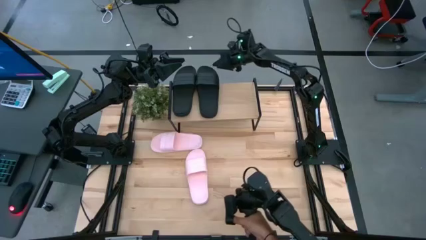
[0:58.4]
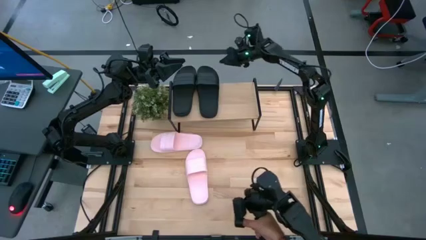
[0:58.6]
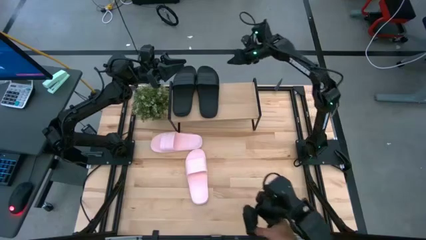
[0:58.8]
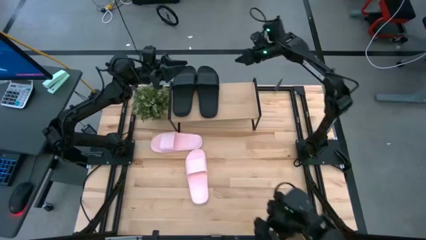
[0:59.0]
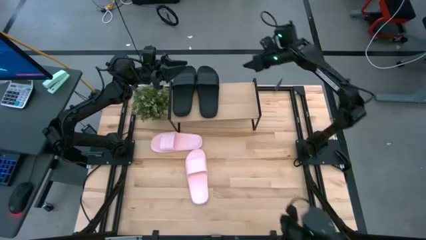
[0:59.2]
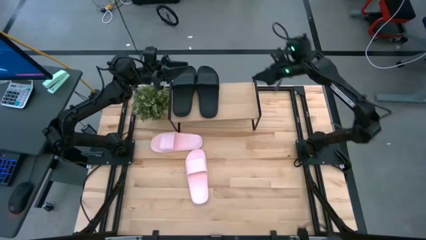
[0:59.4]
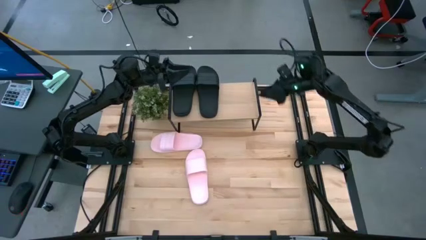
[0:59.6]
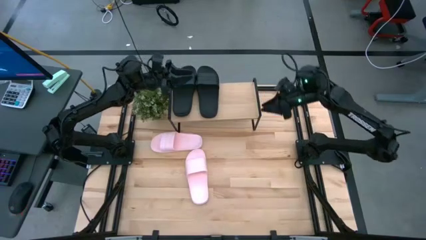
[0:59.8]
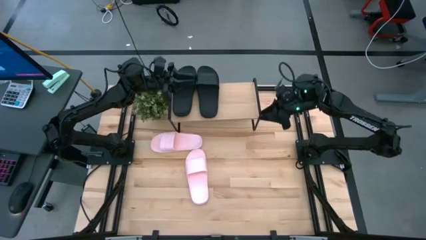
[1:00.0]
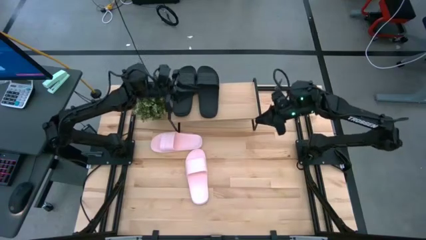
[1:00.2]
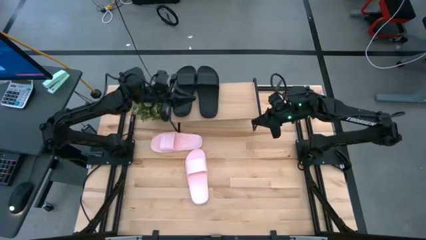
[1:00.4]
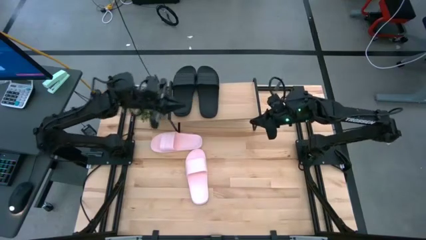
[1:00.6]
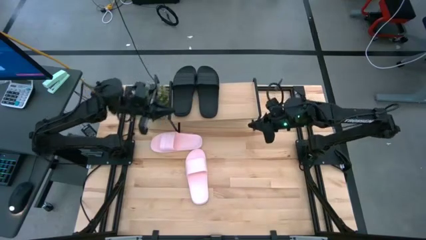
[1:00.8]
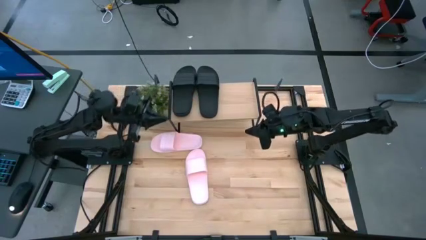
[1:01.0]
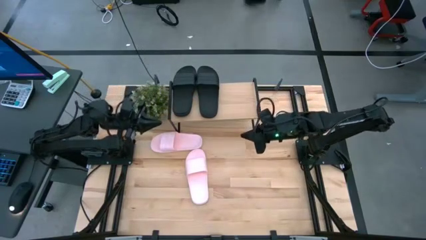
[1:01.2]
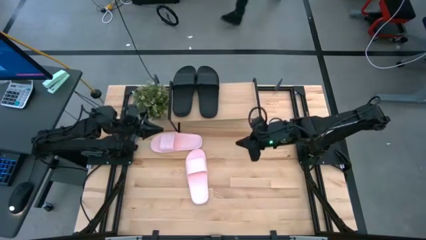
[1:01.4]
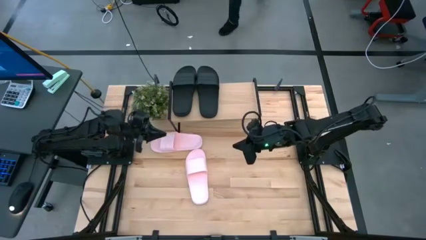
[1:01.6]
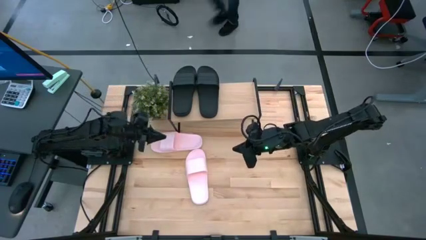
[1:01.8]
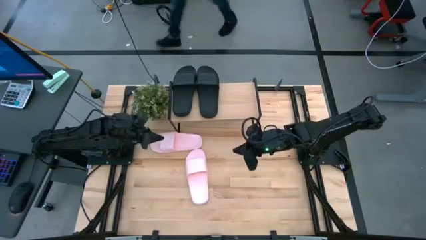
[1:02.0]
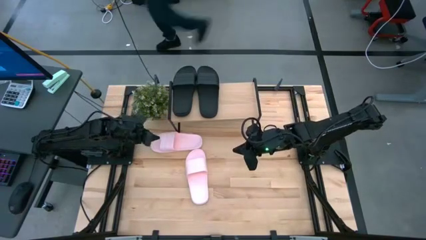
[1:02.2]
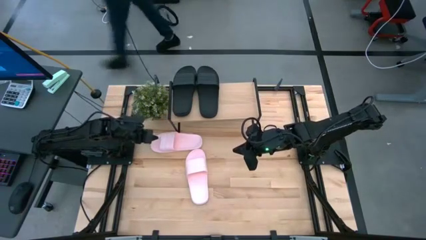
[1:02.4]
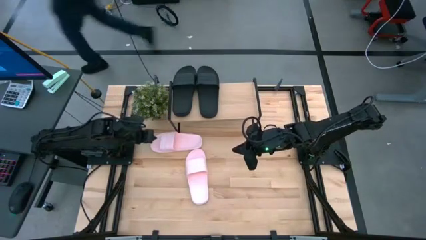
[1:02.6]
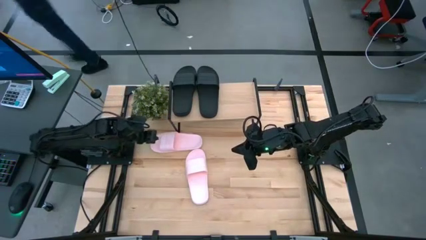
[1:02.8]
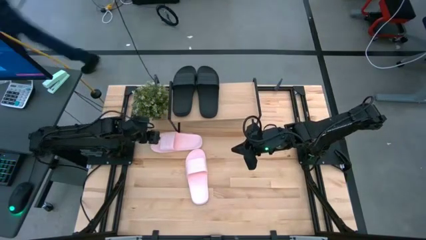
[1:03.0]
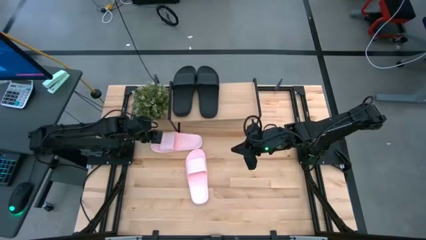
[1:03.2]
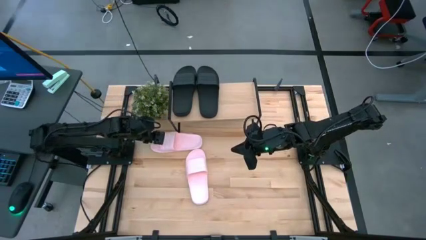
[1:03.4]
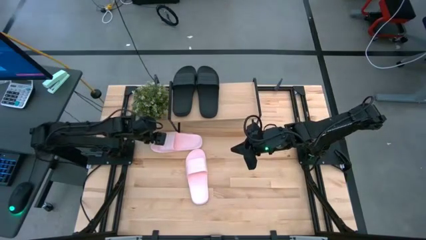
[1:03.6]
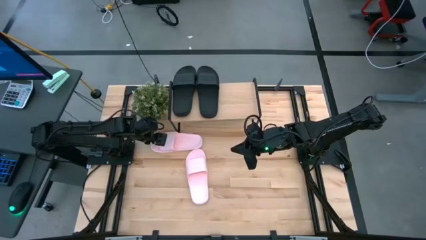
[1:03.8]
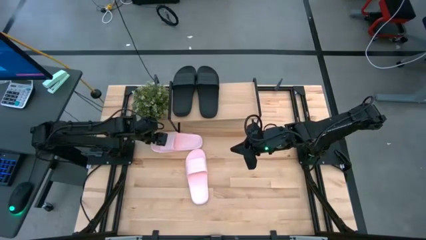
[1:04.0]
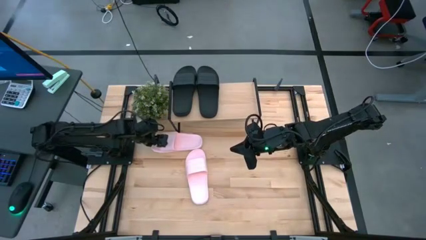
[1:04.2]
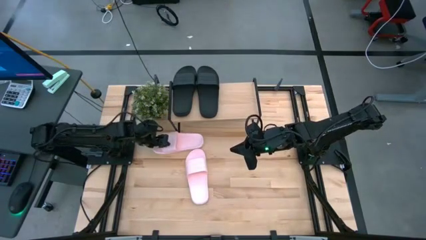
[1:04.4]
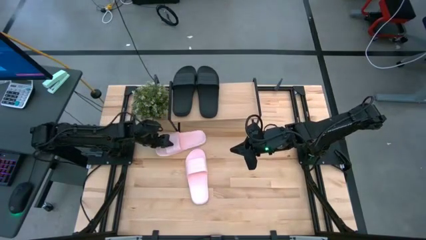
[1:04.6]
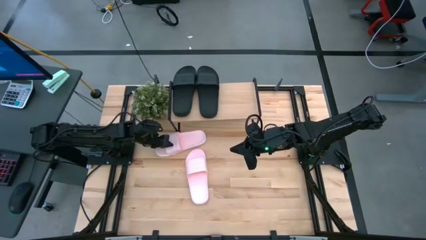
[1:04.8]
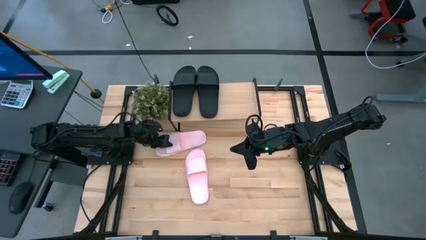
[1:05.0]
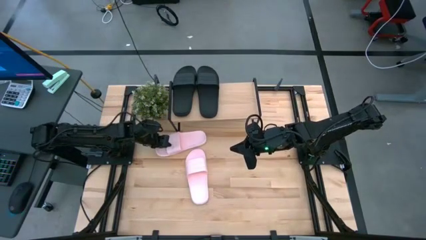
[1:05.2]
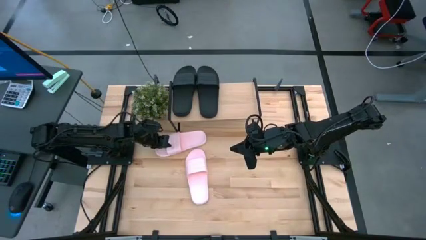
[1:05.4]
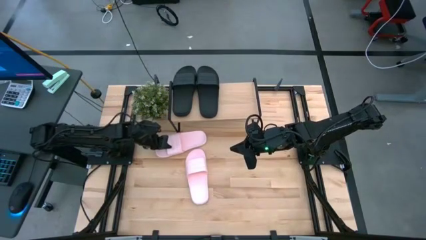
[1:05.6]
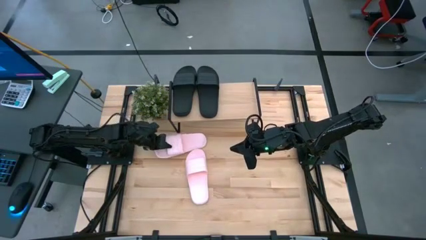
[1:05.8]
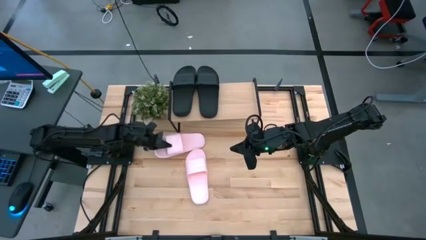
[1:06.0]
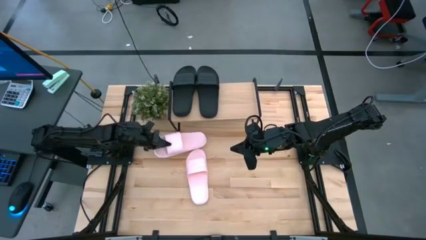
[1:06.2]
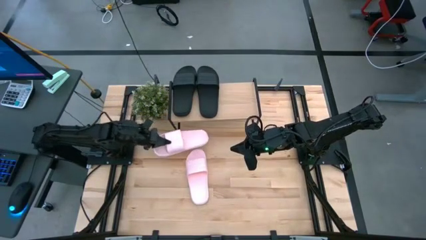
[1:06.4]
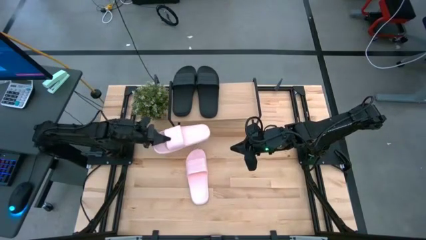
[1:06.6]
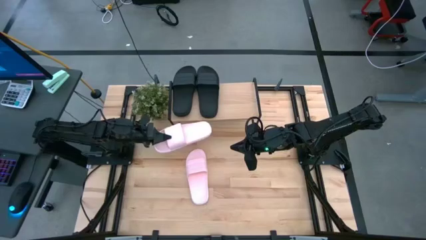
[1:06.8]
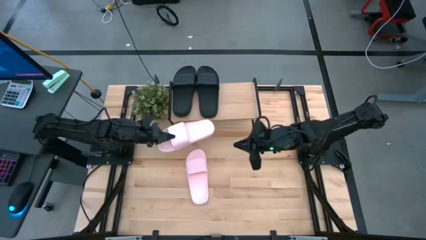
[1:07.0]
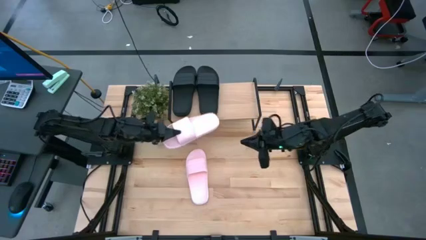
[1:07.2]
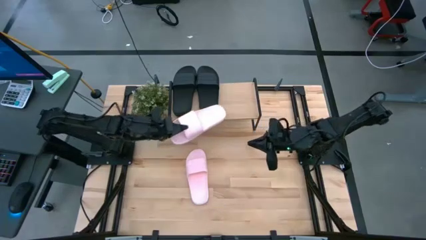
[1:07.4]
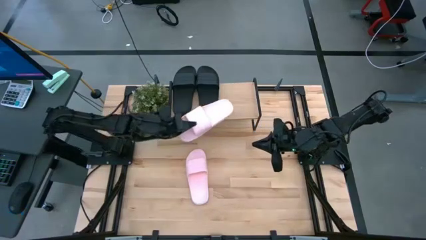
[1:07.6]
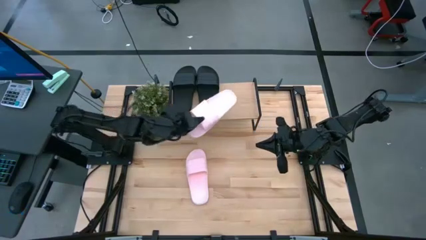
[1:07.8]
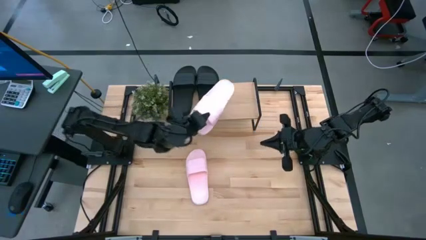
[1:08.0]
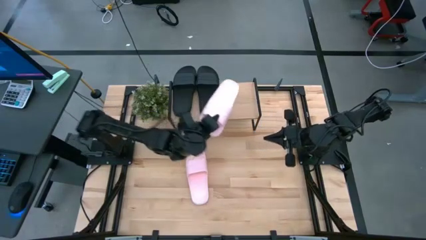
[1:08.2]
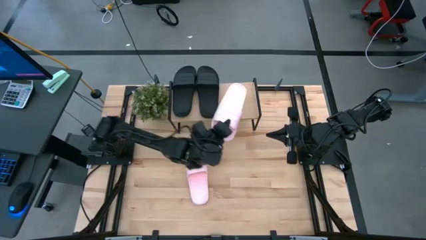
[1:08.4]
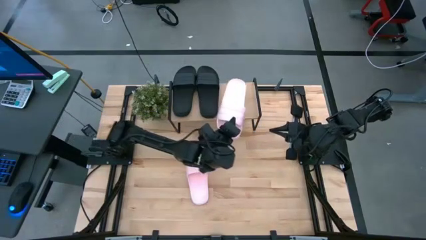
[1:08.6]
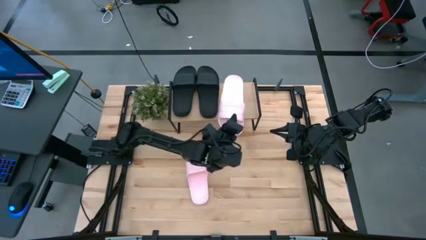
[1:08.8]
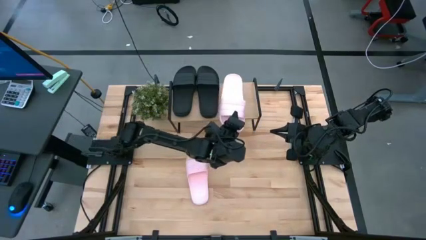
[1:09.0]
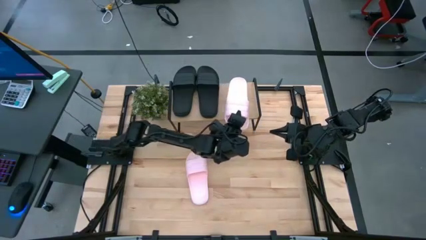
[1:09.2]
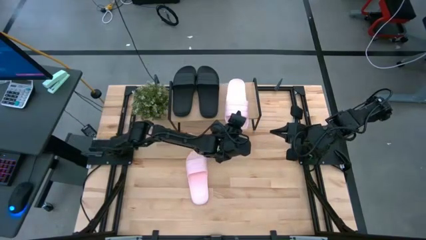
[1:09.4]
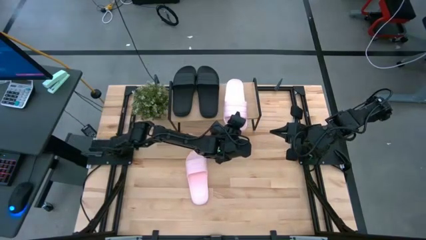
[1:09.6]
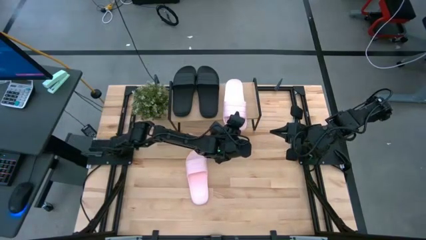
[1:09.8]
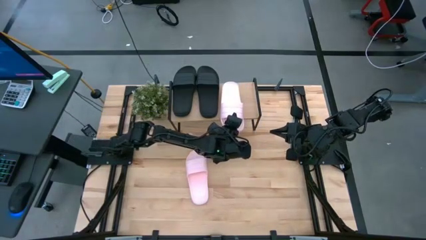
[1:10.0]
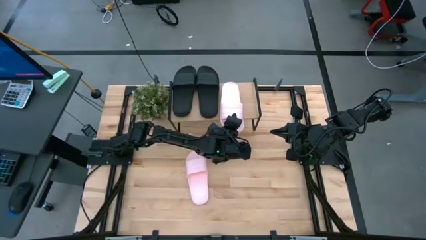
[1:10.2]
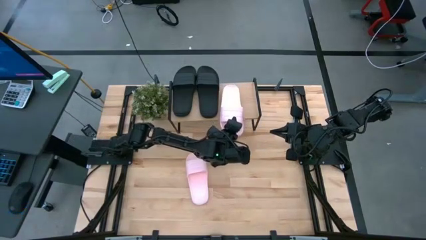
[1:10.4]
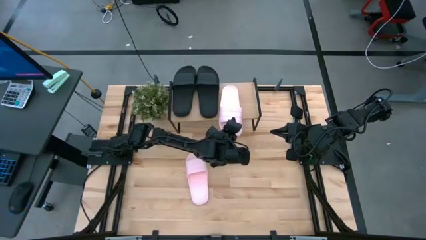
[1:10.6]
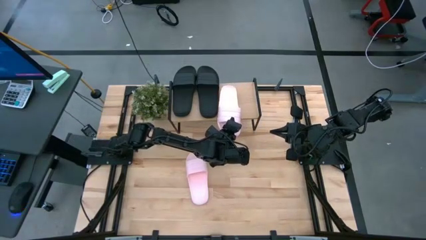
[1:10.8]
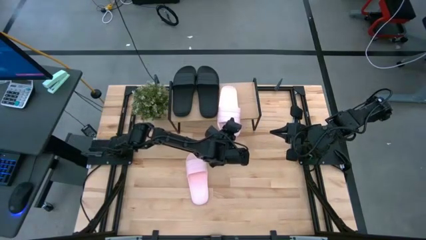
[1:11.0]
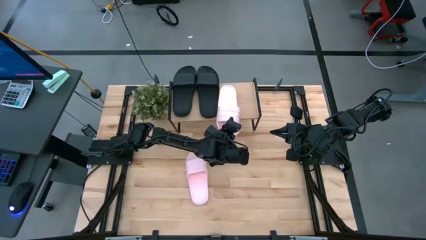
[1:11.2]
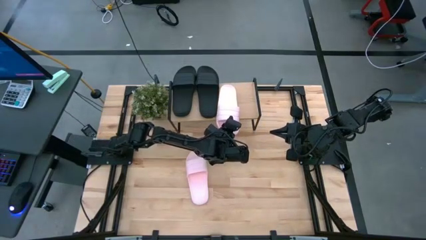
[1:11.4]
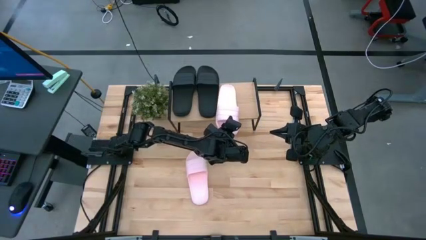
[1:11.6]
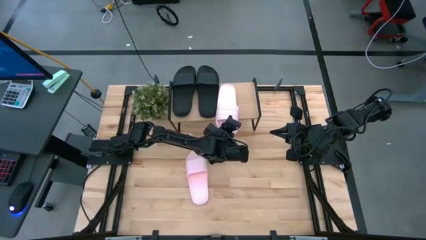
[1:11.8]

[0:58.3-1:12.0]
Task: Pick and place slides into the shelf
Put the top pink slide on the shelf

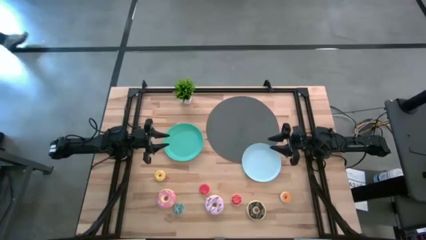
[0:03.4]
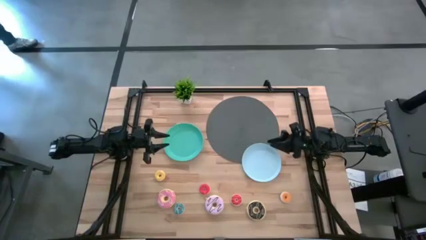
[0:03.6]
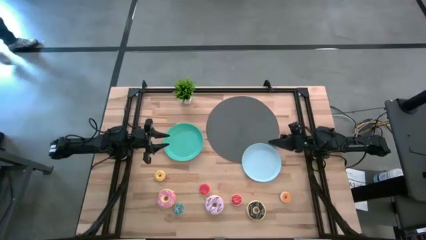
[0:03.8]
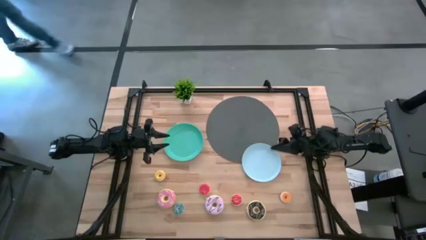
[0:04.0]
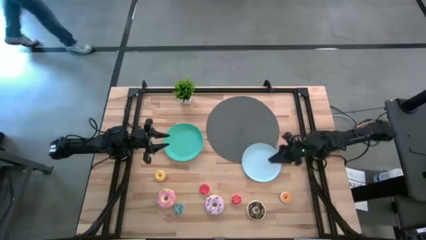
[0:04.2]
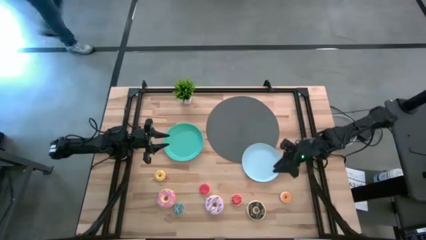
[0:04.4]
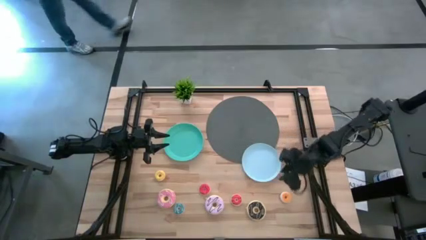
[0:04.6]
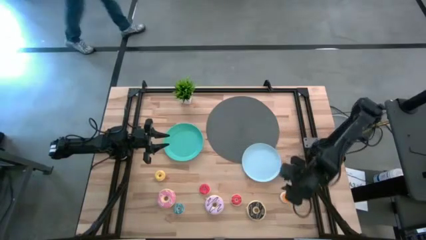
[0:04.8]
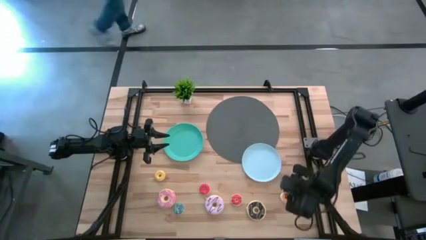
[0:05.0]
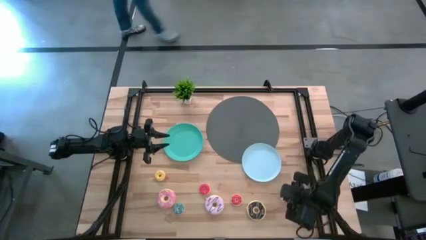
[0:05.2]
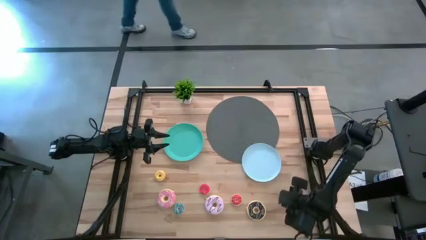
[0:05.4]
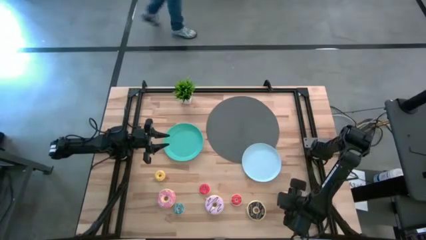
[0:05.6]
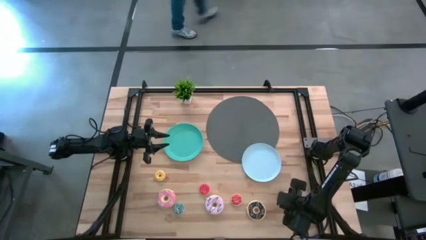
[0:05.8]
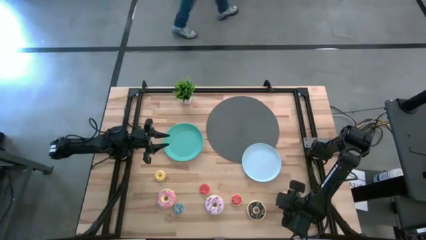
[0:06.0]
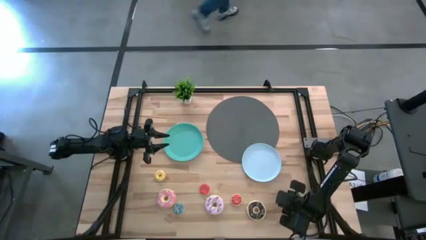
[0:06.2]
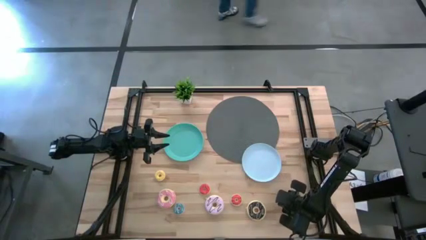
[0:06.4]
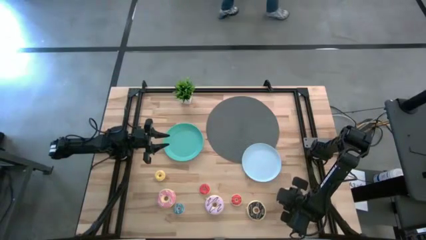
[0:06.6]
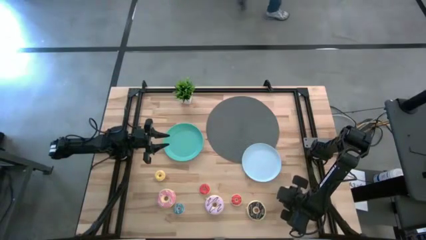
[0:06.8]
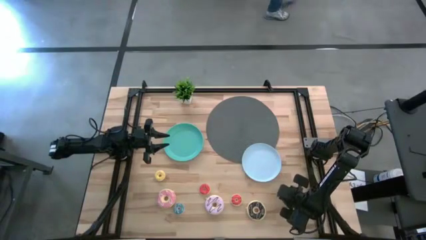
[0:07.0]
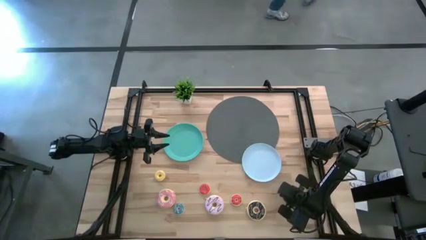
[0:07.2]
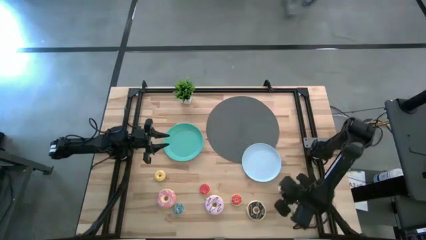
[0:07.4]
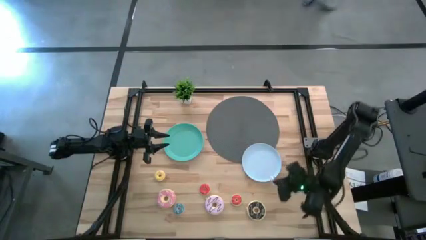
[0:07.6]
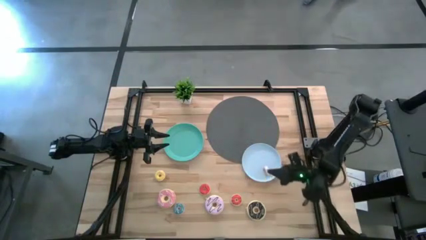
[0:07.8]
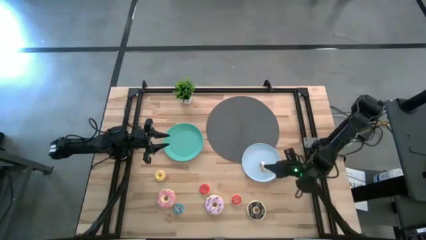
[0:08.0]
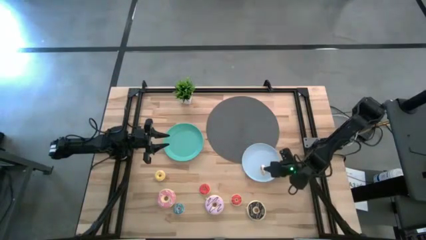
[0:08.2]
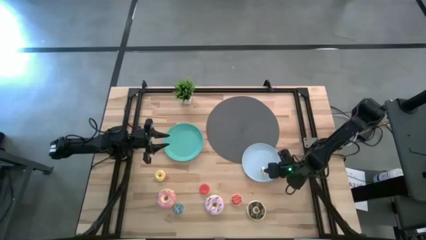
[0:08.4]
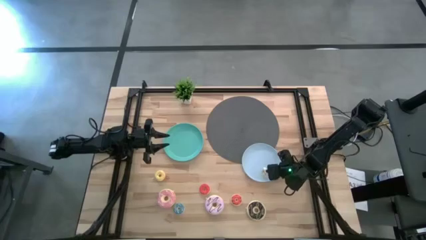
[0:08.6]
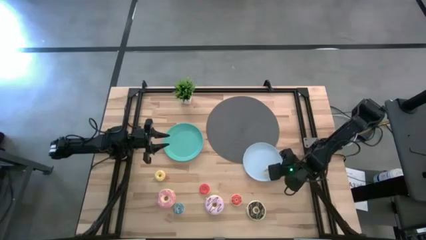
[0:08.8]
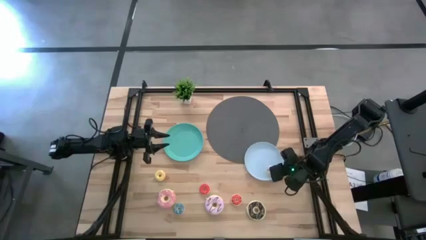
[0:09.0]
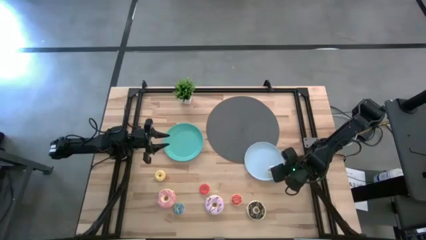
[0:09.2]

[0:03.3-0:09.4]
Task: Pick & Place donuts
Put the small white donut on the blue plate
